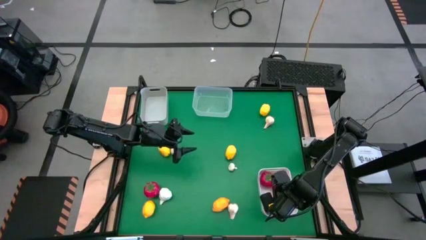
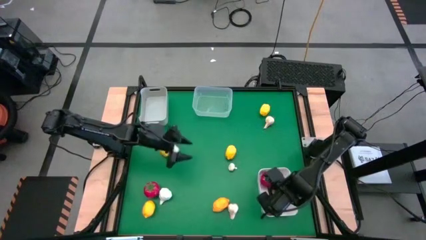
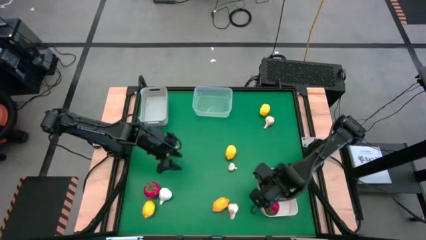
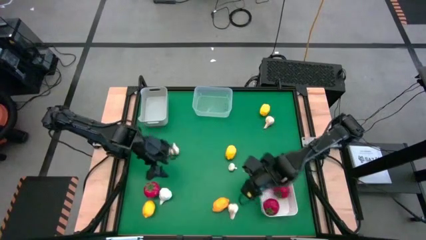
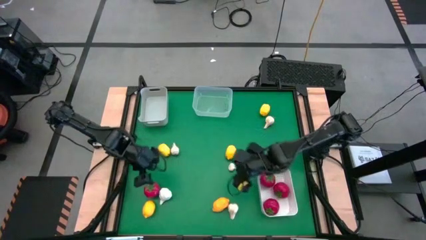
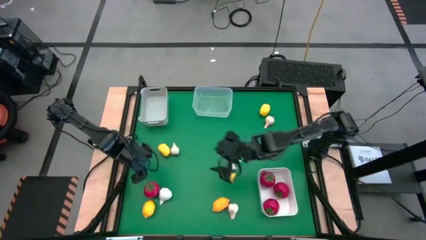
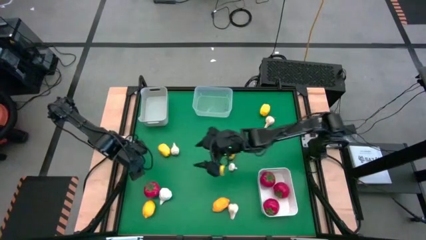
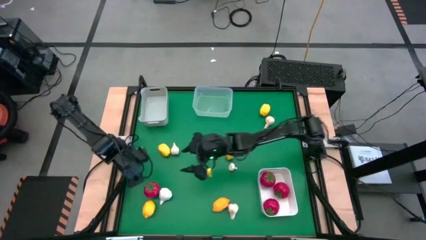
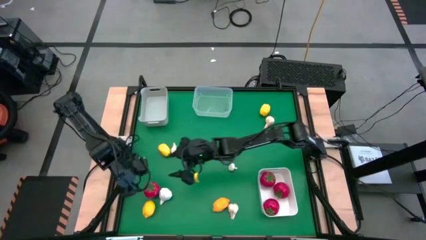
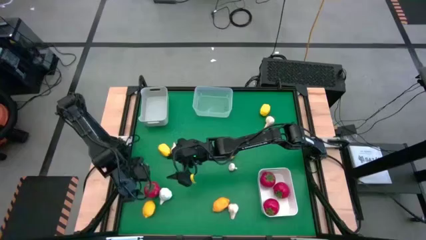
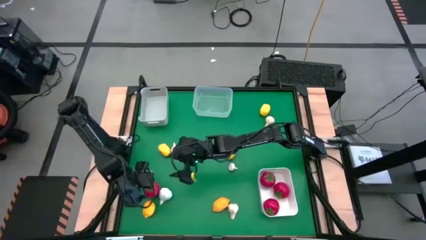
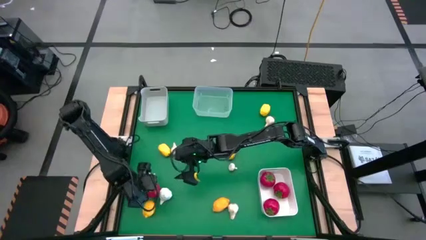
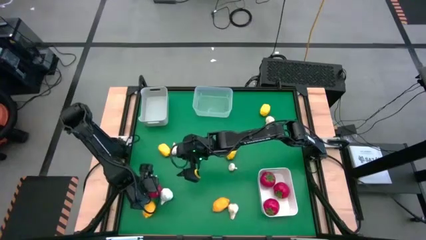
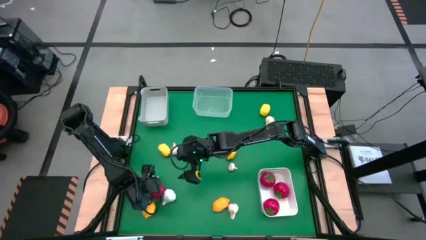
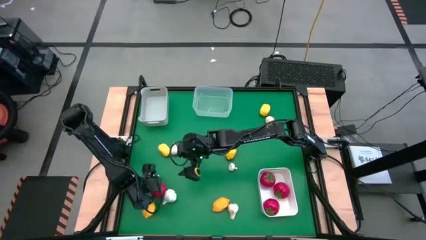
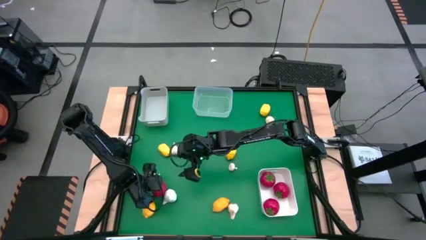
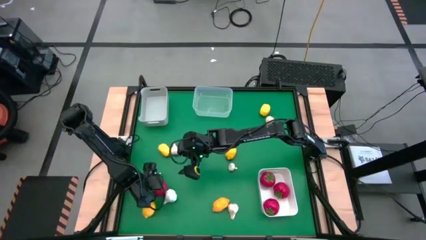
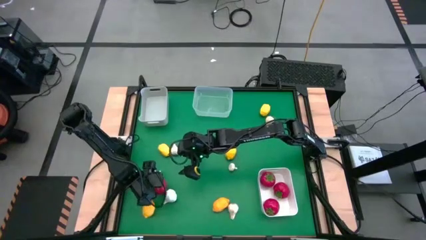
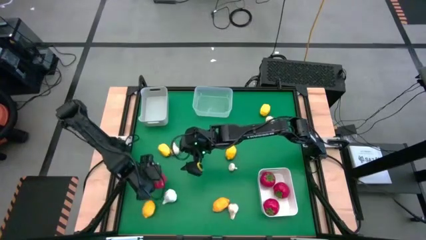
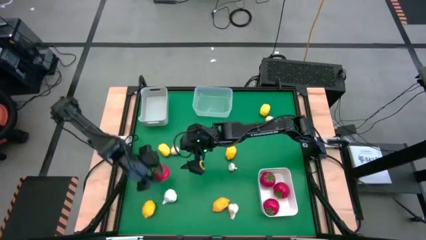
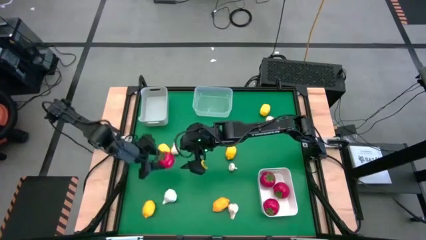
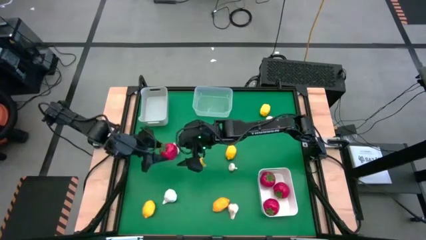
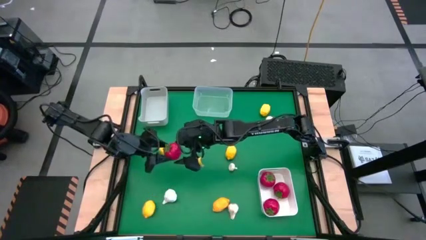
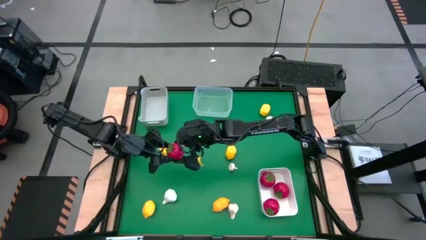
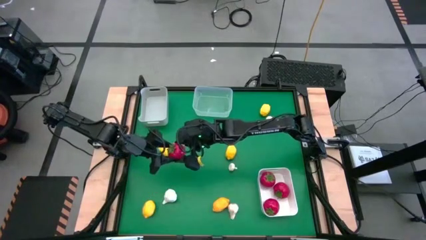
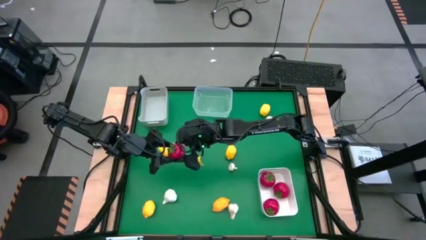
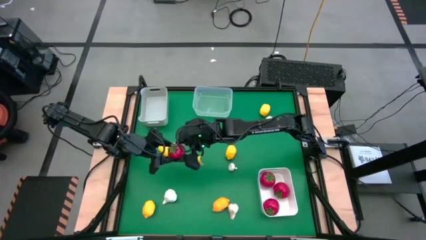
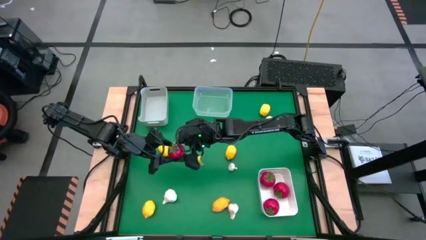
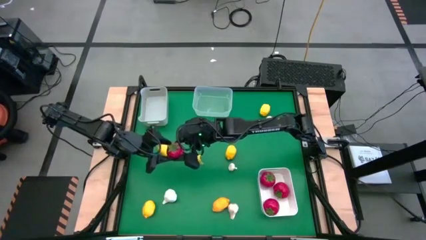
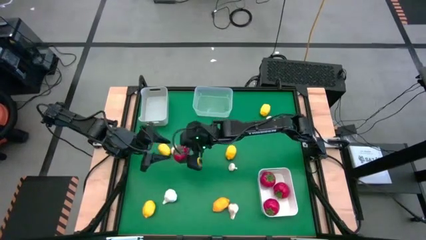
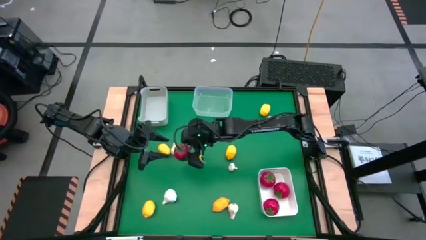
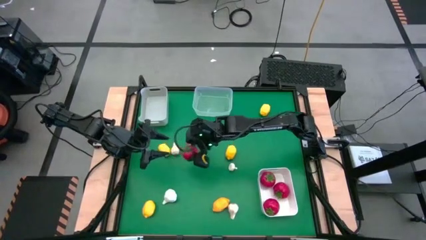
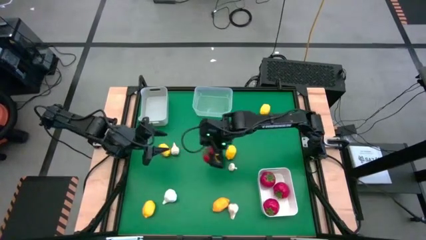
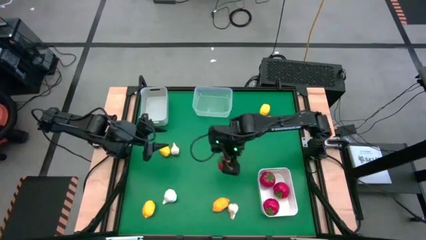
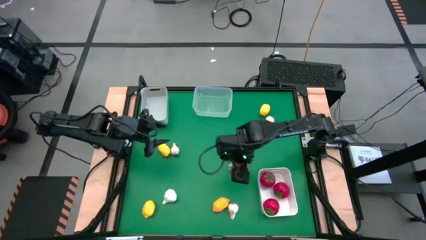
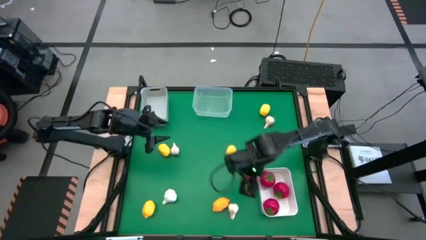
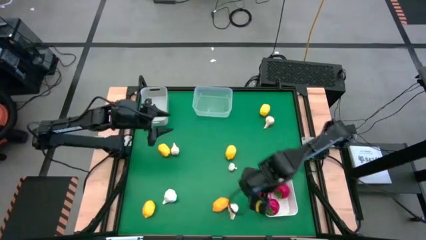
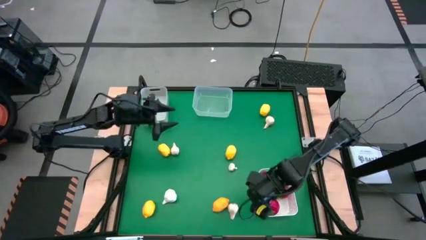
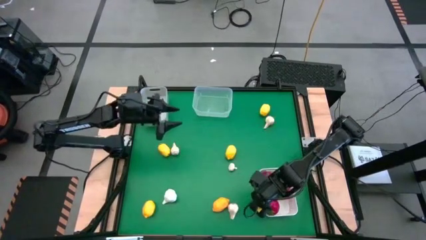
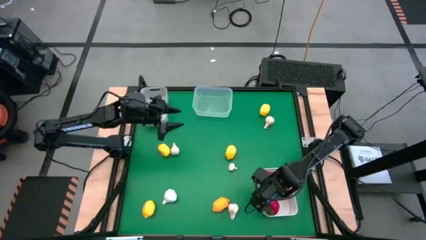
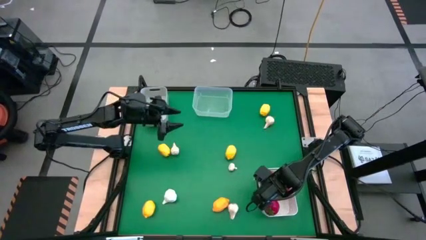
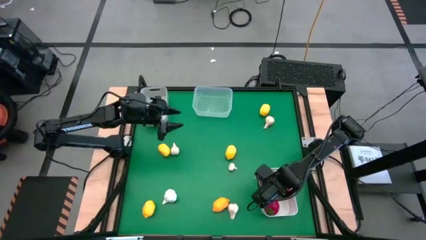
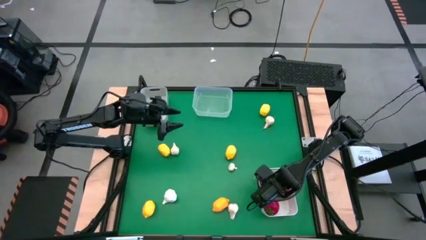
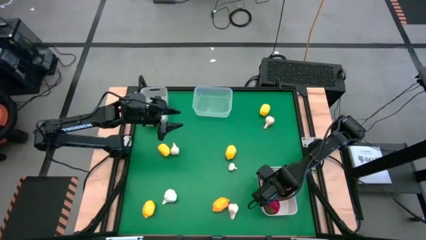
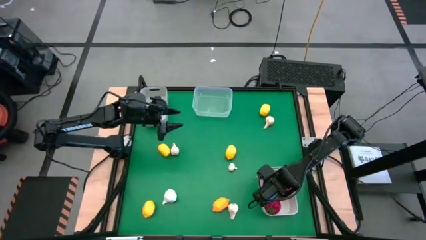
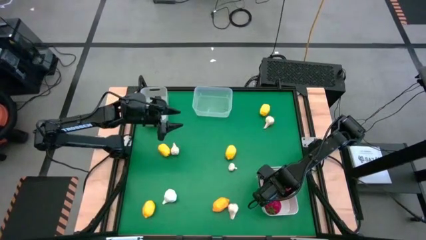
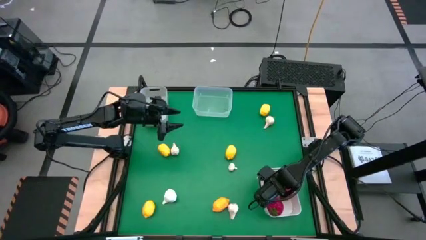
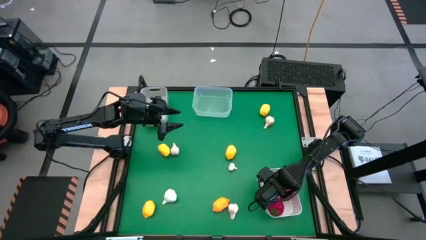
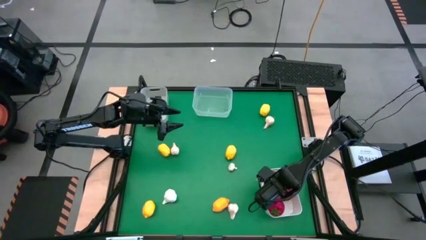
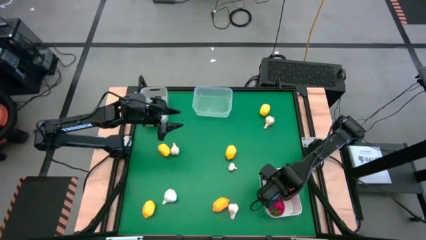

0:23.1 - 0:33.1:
Task: Sort produce into baskets
Put the red tomato into the white bin

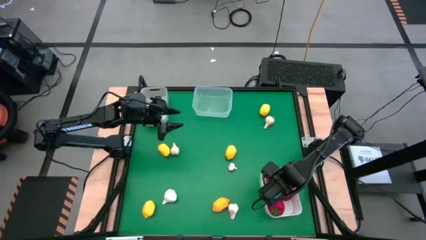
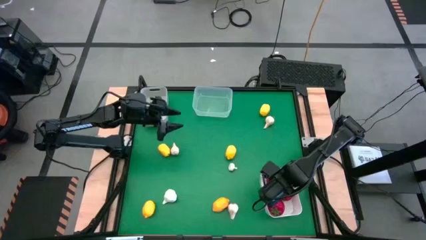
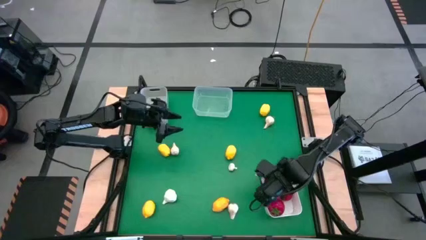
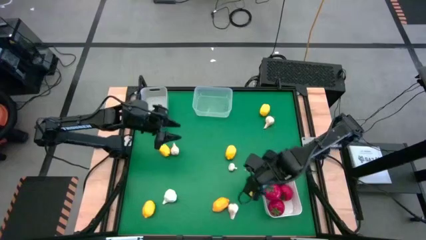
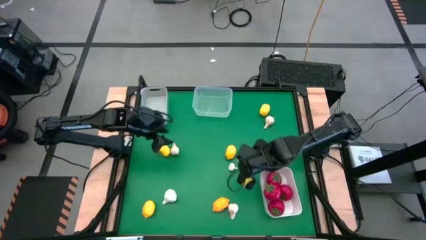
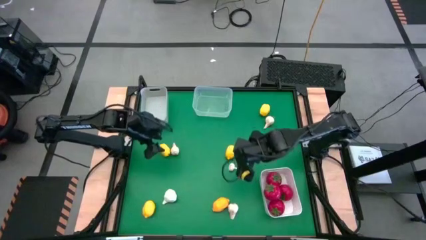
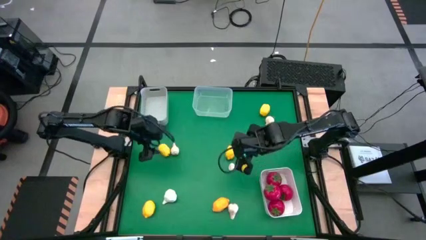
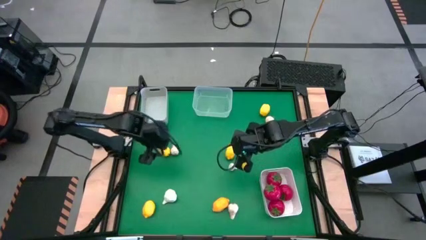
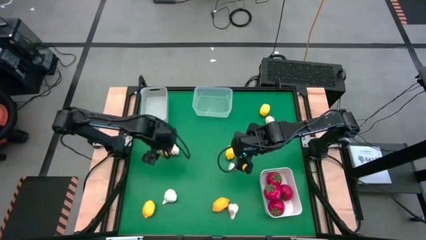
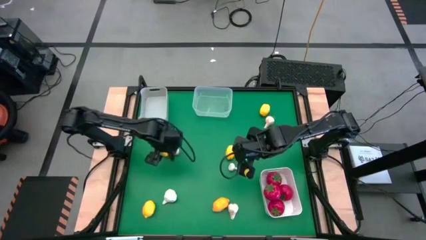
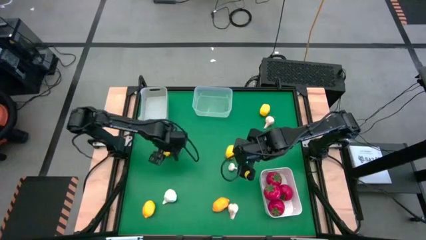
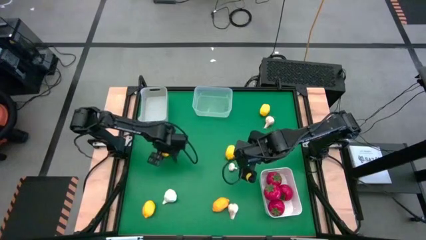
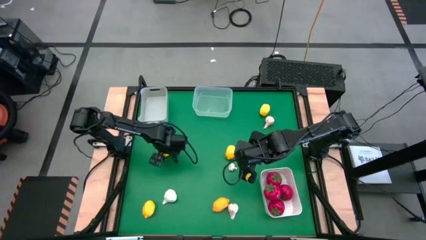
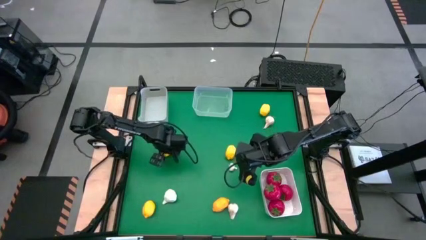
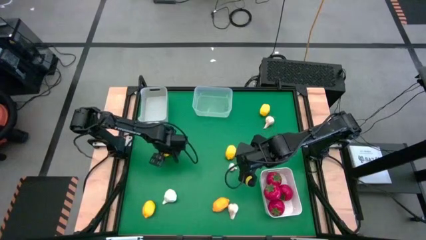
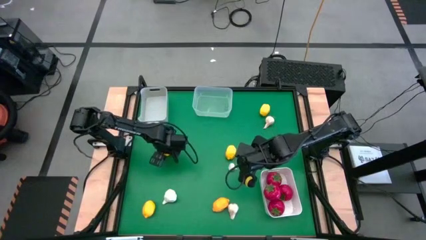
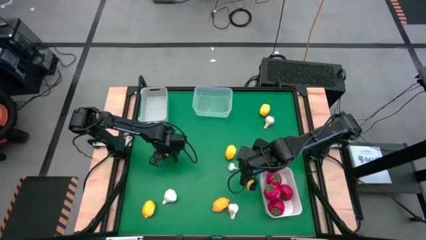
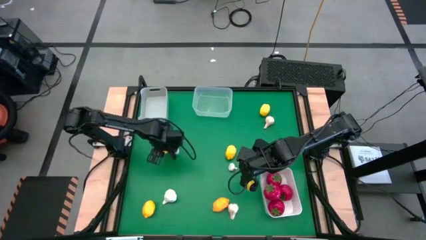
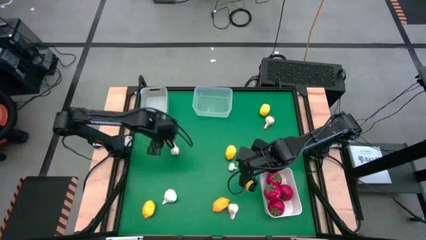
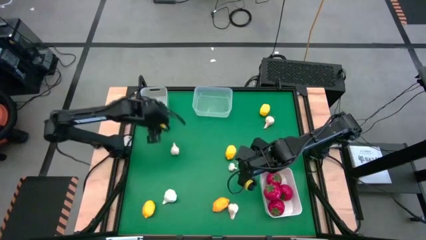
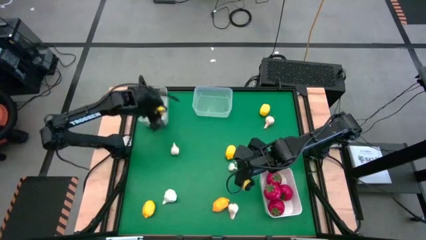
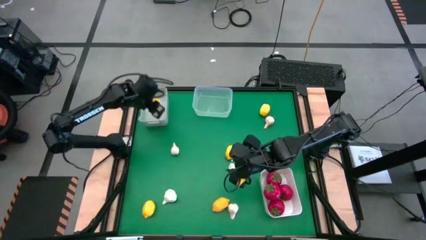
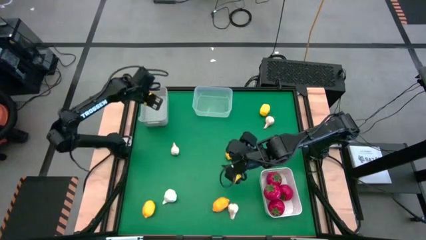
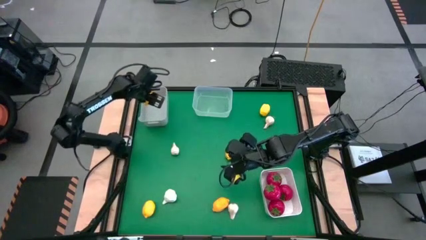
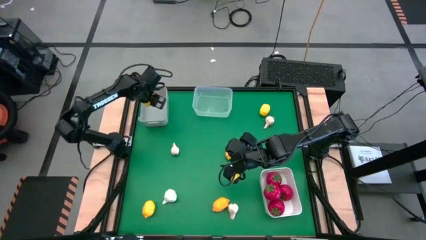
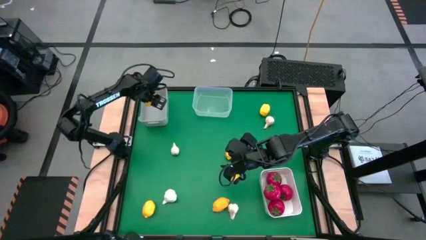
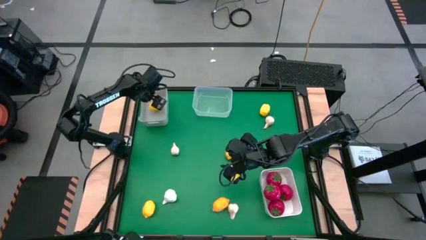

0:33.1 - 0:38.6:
Put the yellow lemon into the gray bin
